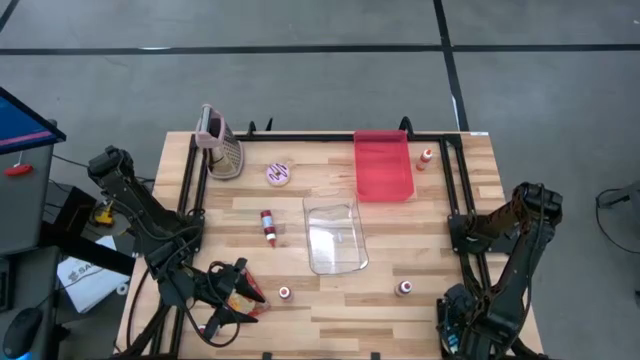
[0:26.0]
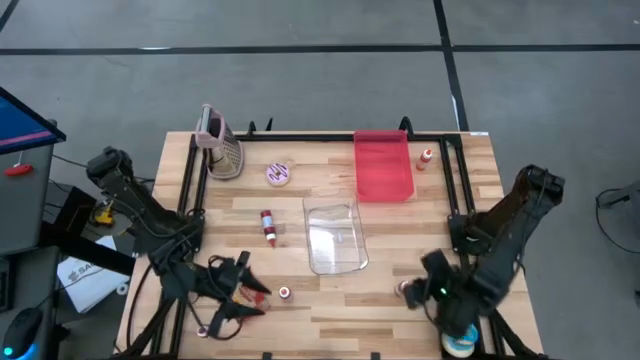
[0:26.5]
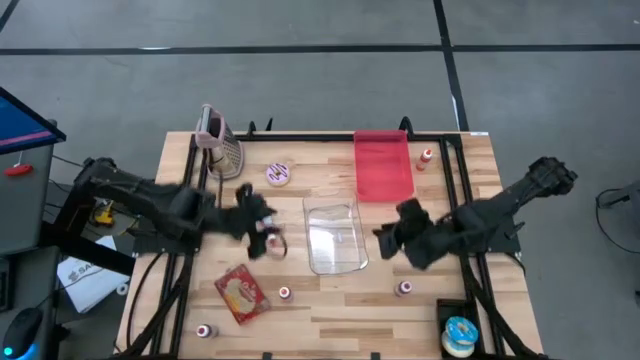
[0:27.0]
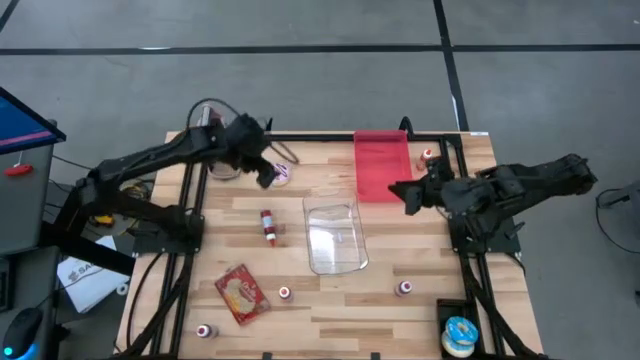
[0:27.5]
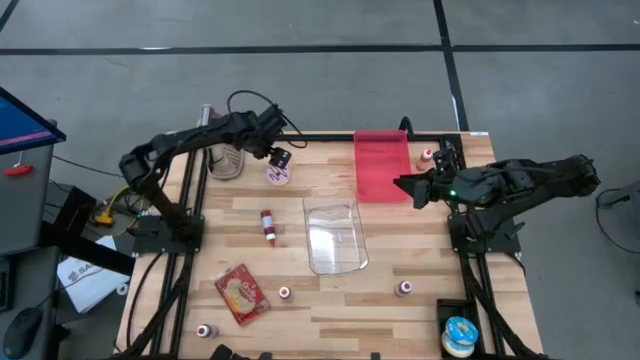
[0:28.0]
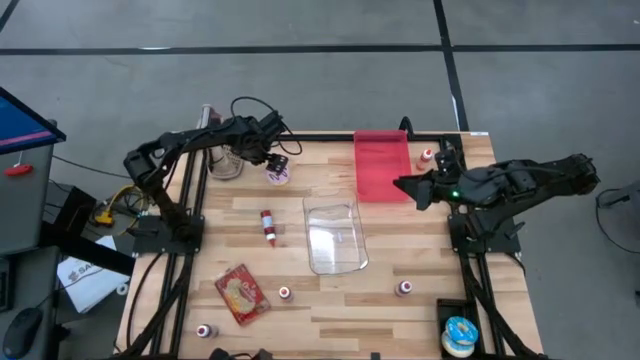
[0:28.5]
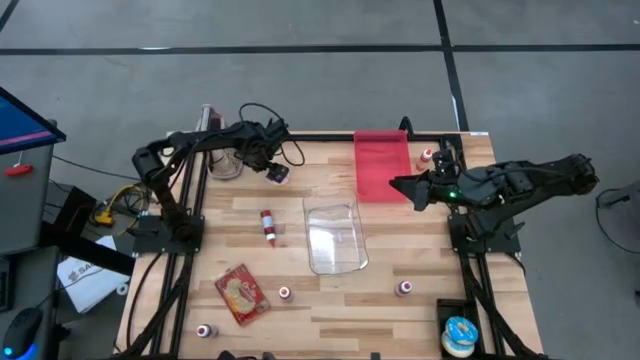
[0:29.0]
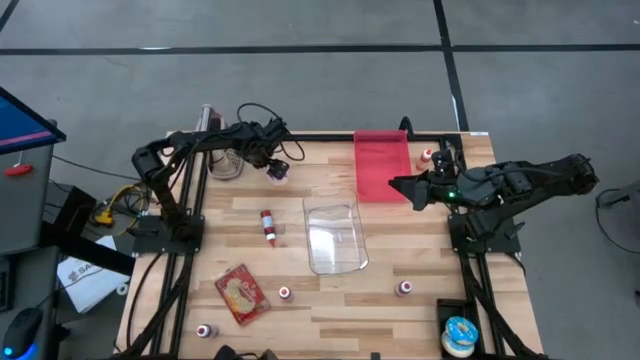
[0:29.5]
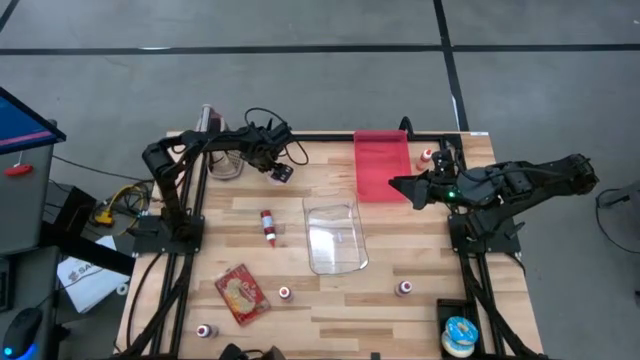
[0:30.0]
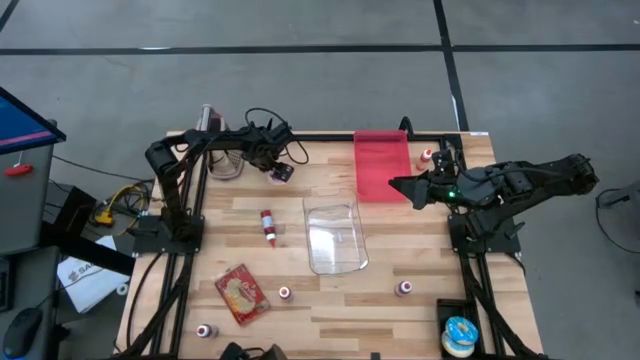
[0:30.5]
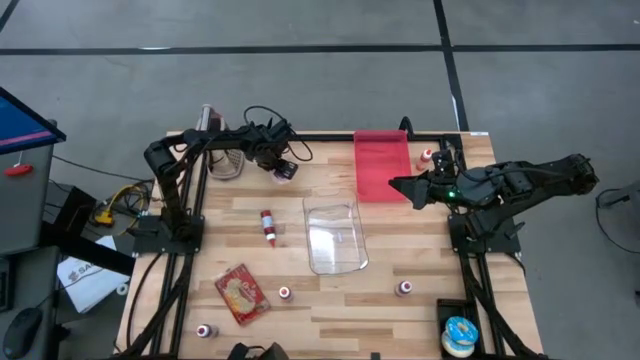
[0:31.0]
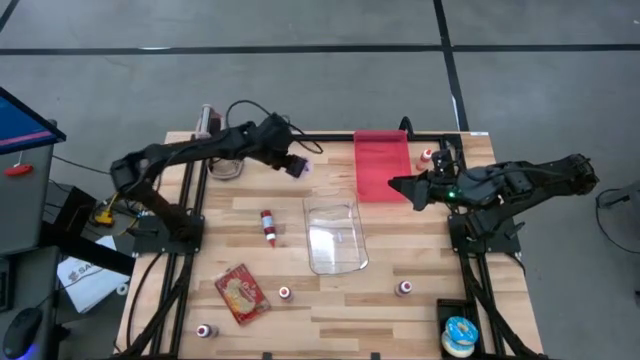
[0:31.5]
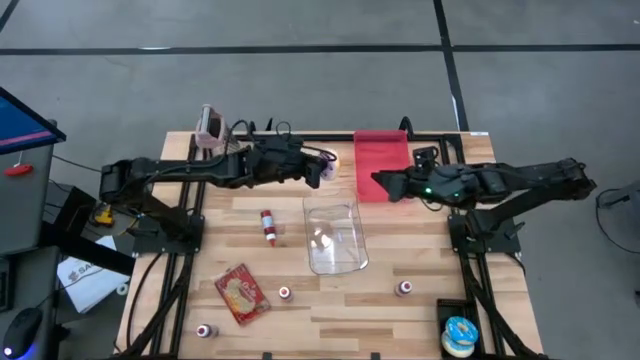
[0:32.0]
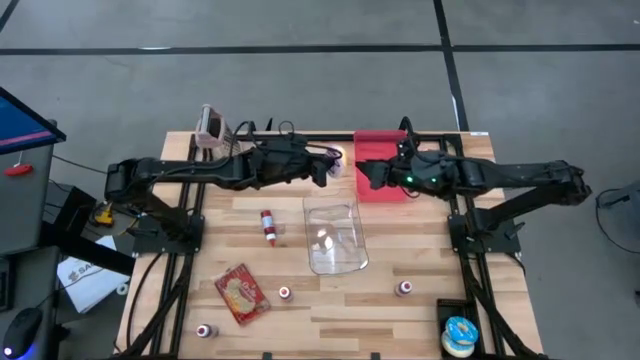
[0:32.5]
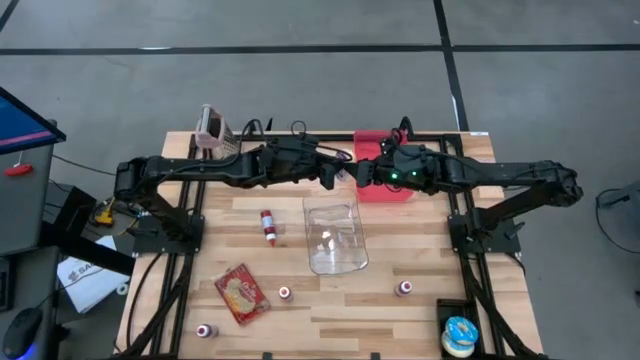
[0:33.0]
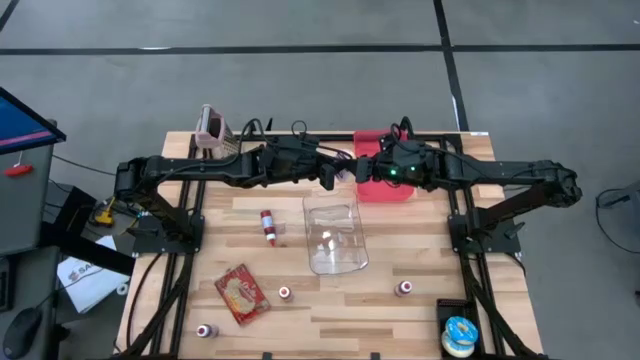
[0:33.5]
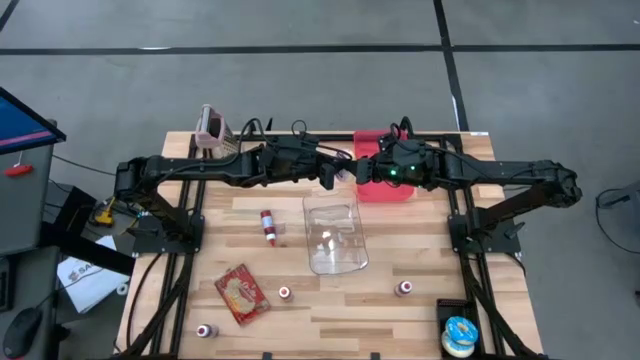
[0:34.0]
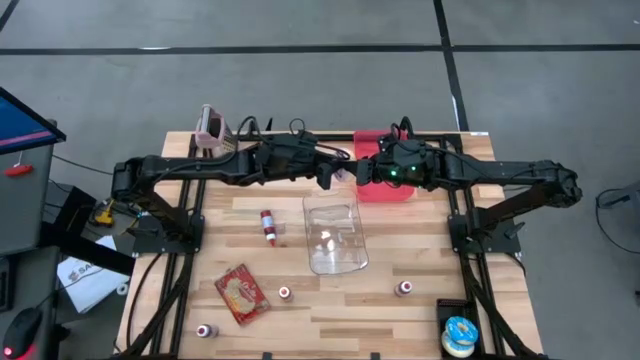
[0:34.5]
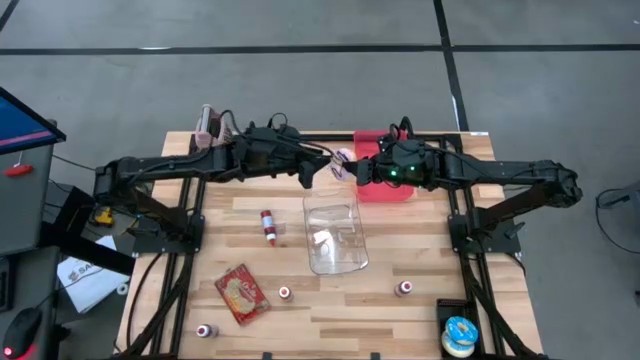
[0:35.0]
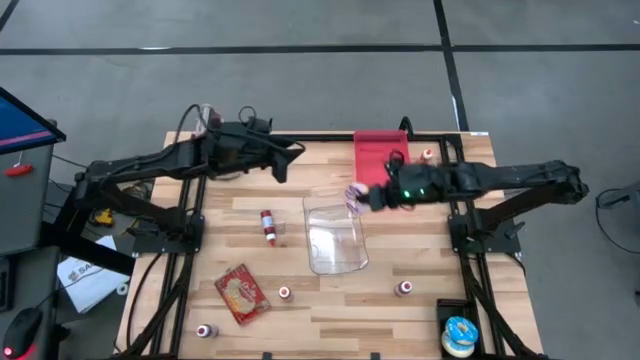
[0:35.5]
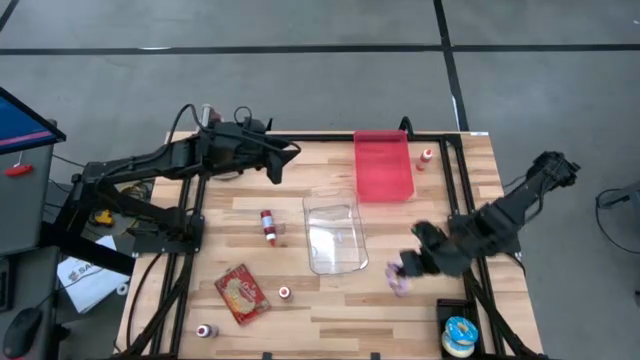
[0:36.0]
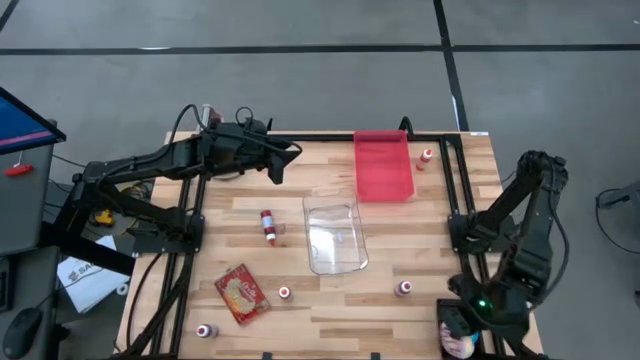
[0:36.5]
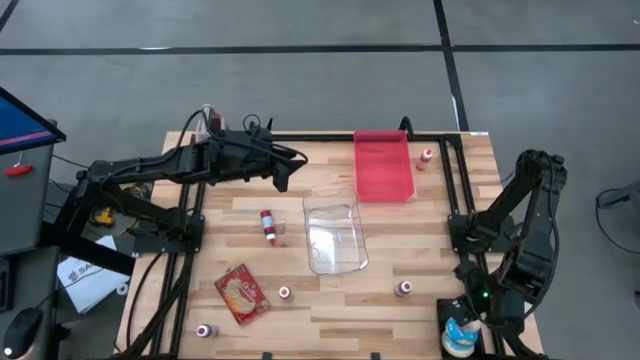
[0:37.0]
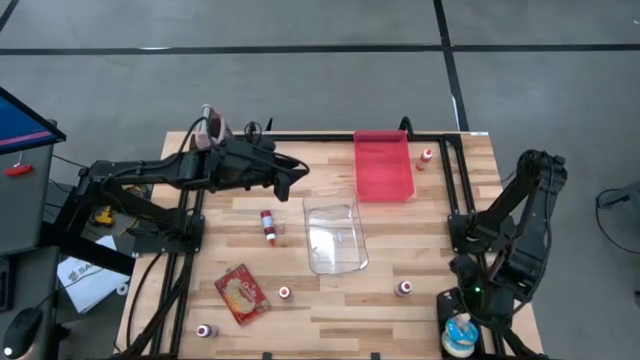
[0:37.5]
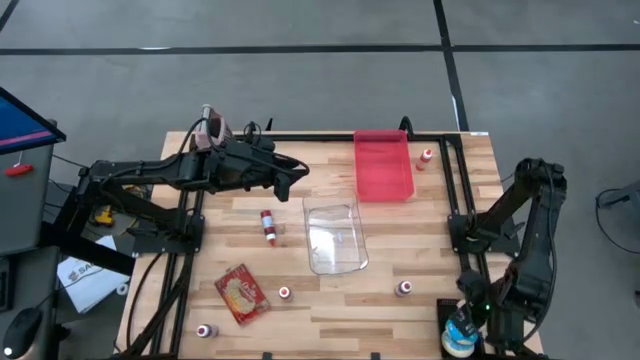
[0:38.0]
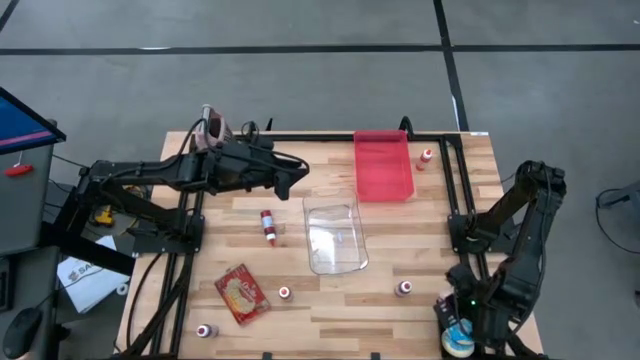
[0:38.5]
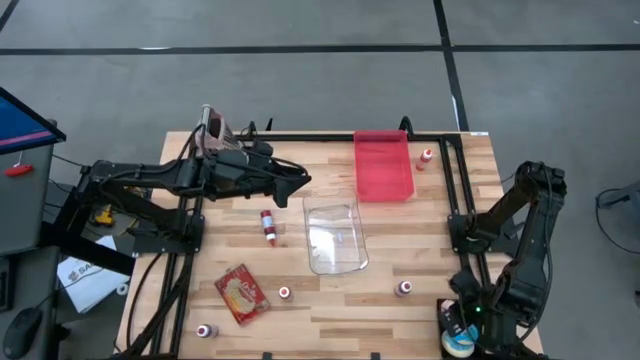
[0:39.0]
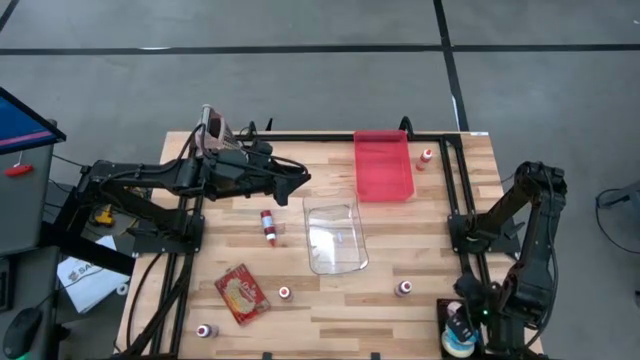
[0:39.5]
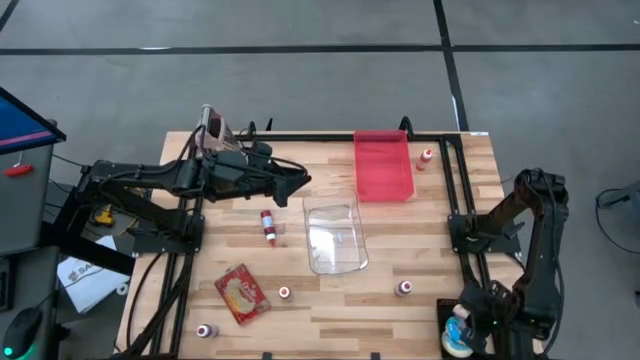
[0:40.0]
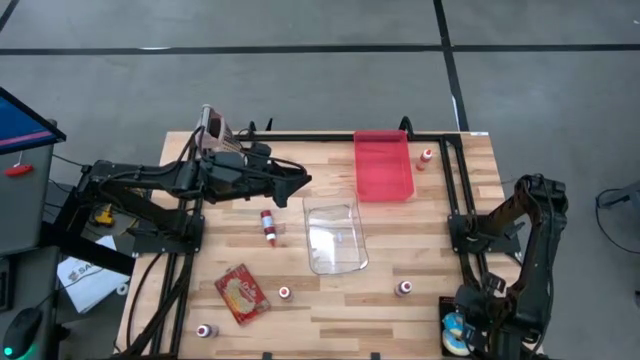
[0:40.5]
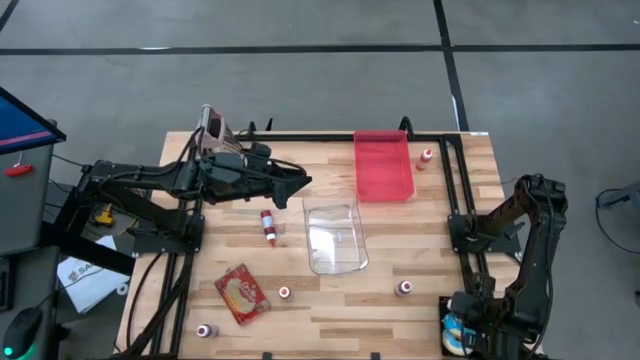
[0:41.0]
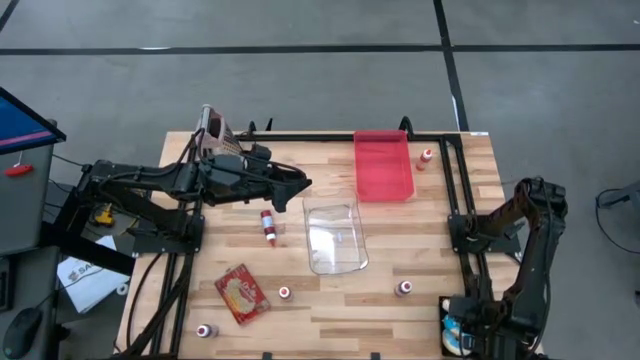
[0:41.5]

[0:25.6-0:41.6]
Put the violet donut into the black bin
